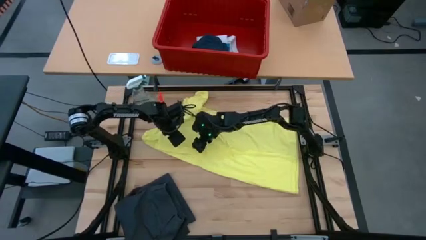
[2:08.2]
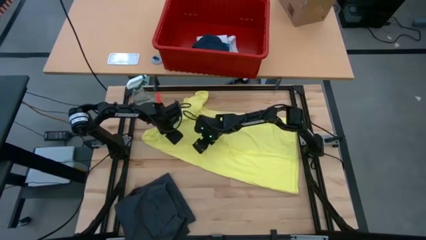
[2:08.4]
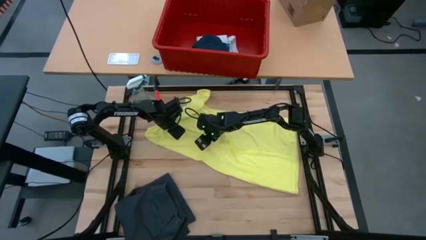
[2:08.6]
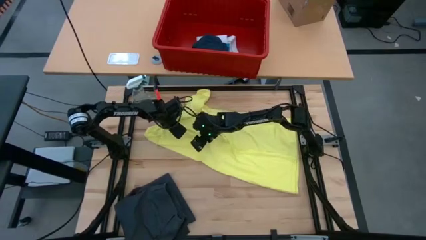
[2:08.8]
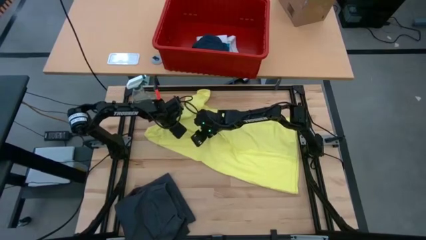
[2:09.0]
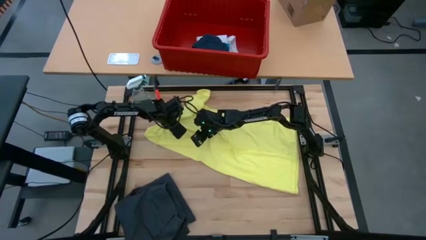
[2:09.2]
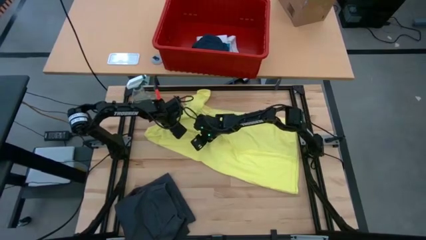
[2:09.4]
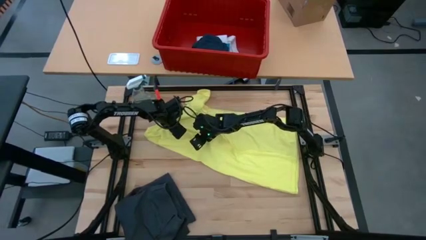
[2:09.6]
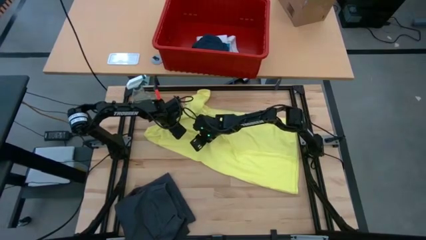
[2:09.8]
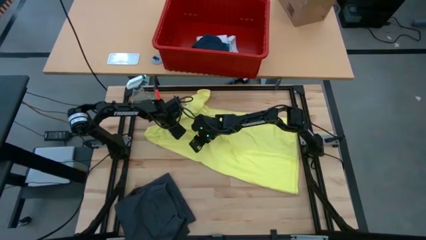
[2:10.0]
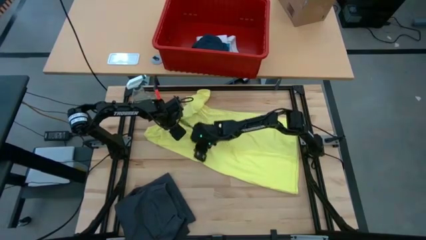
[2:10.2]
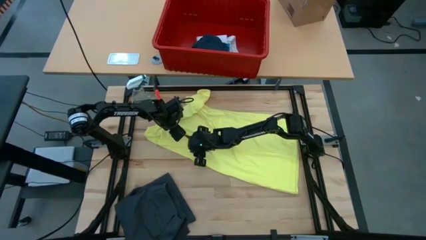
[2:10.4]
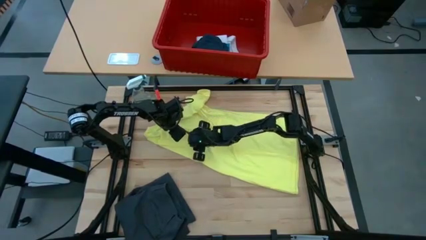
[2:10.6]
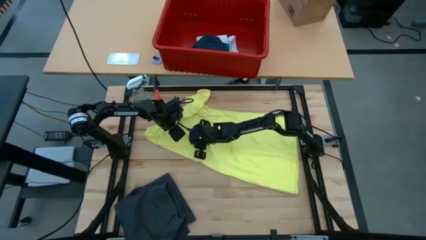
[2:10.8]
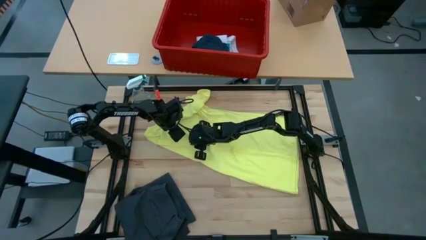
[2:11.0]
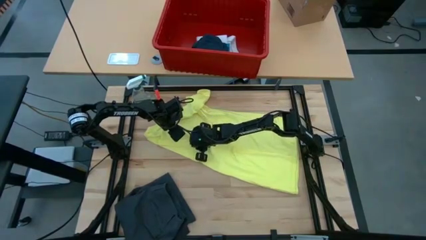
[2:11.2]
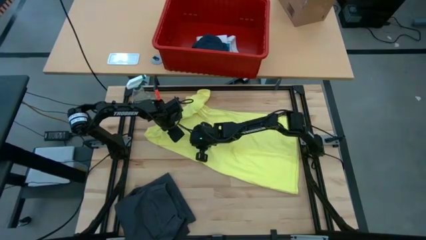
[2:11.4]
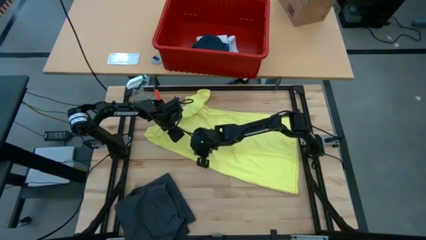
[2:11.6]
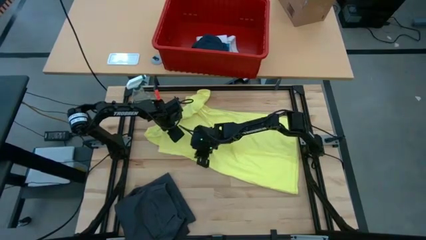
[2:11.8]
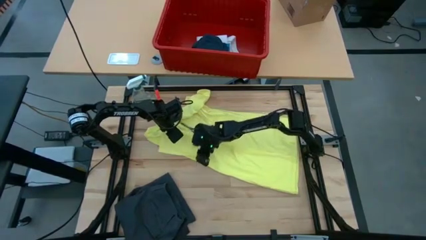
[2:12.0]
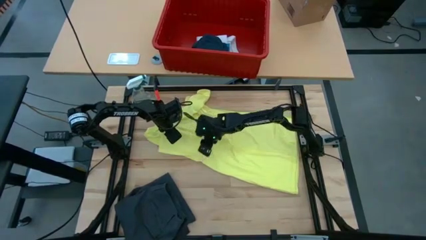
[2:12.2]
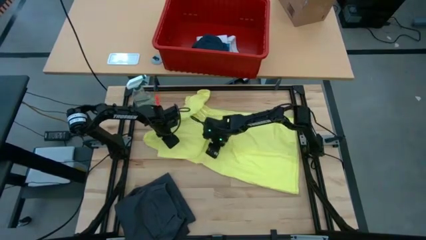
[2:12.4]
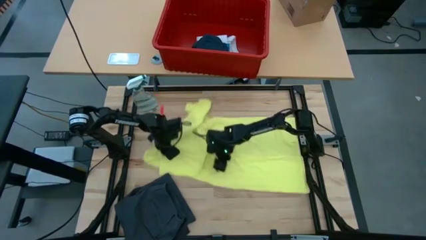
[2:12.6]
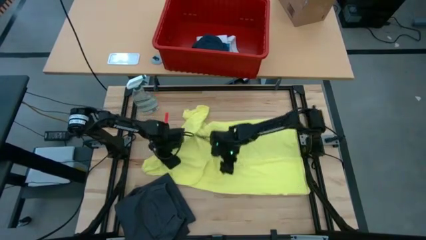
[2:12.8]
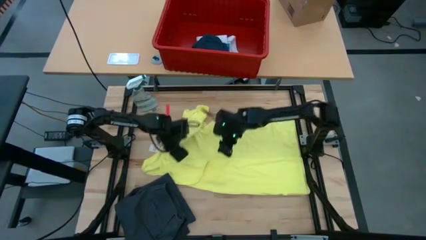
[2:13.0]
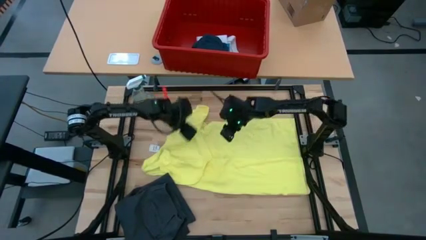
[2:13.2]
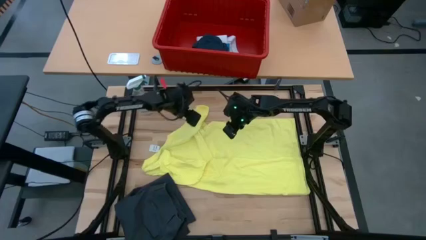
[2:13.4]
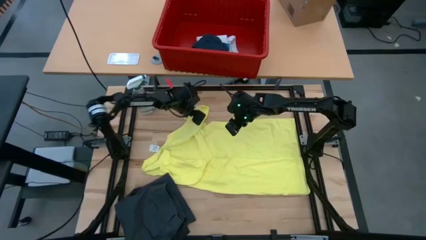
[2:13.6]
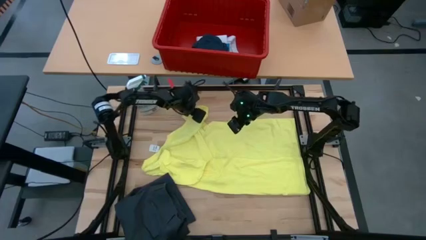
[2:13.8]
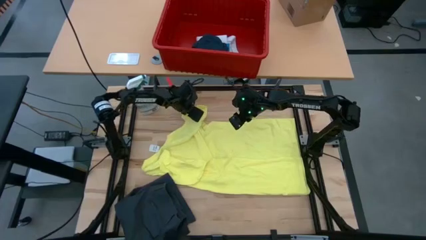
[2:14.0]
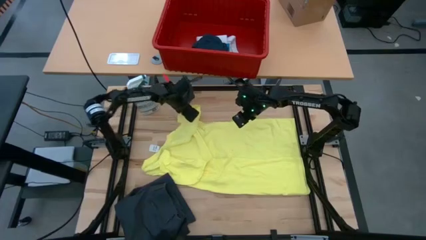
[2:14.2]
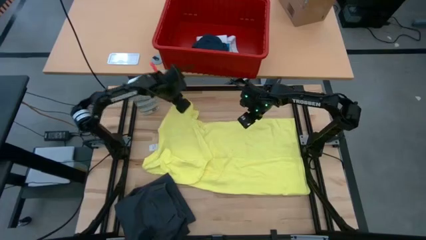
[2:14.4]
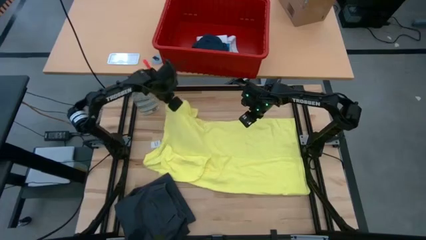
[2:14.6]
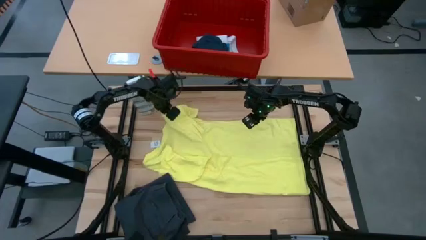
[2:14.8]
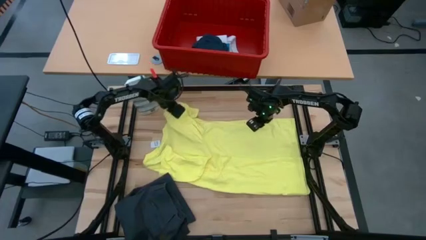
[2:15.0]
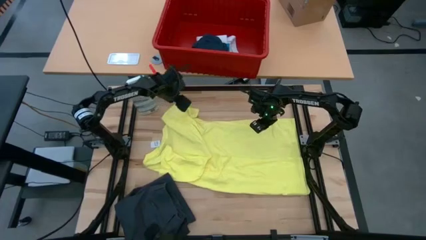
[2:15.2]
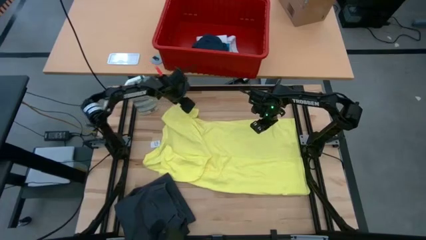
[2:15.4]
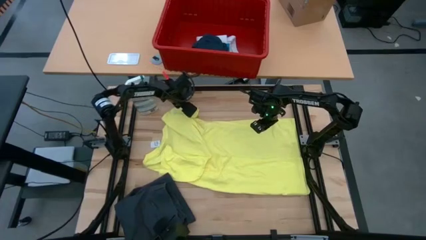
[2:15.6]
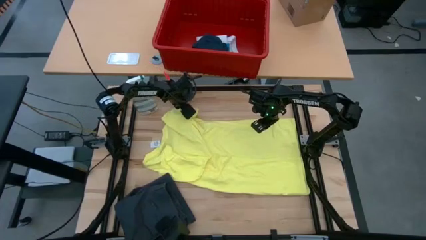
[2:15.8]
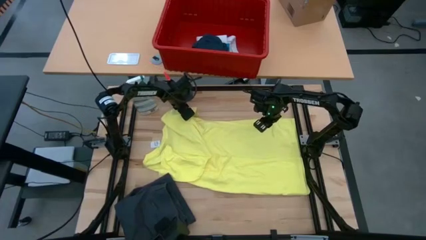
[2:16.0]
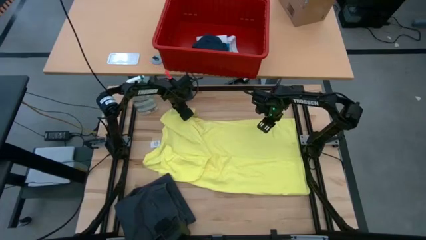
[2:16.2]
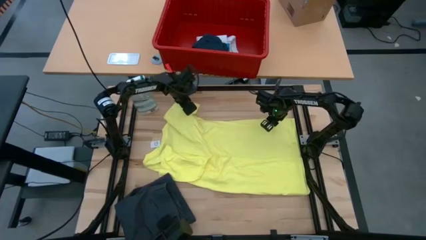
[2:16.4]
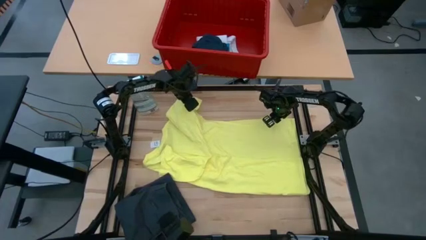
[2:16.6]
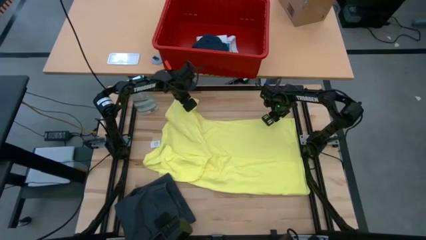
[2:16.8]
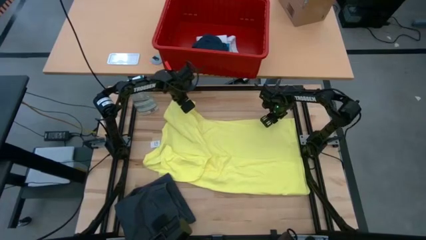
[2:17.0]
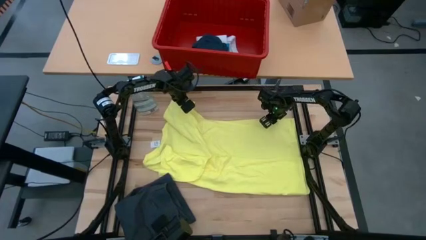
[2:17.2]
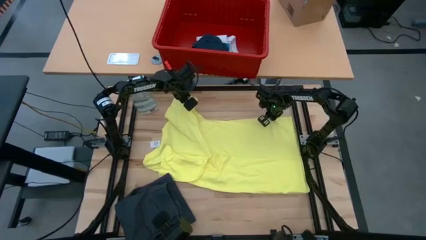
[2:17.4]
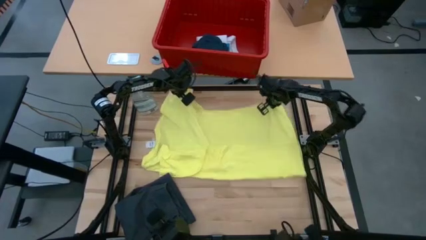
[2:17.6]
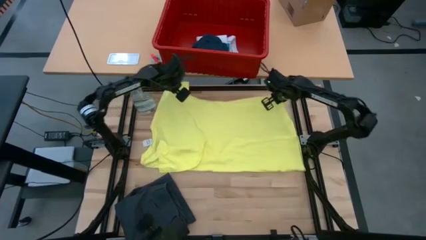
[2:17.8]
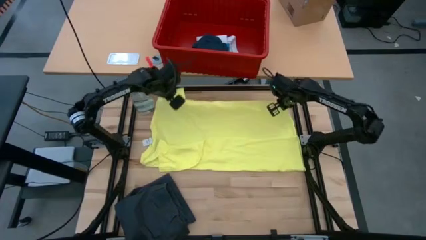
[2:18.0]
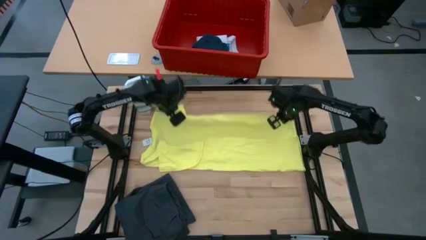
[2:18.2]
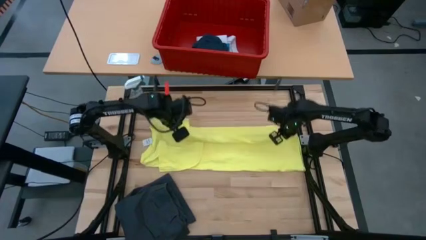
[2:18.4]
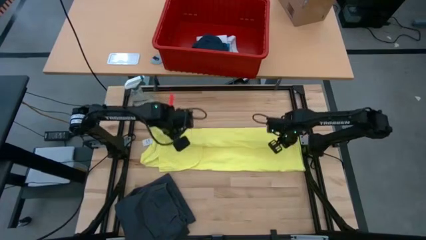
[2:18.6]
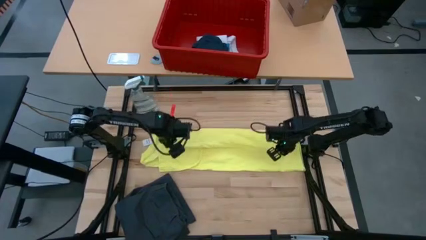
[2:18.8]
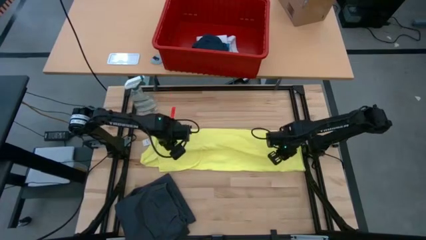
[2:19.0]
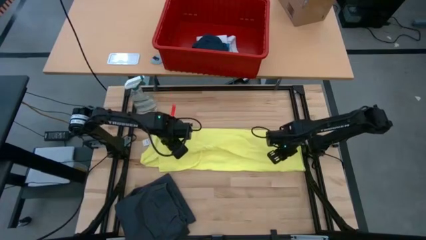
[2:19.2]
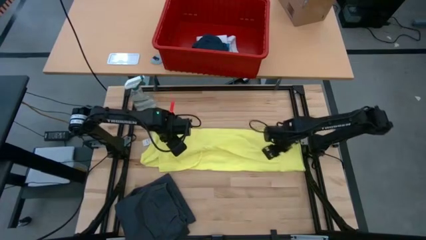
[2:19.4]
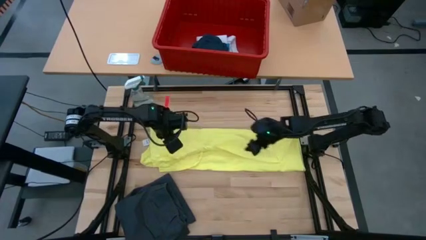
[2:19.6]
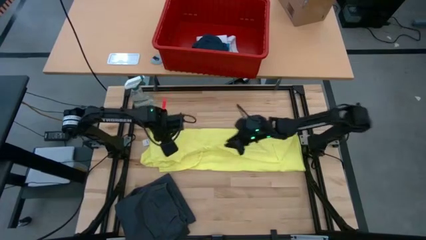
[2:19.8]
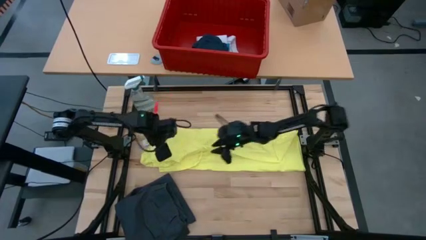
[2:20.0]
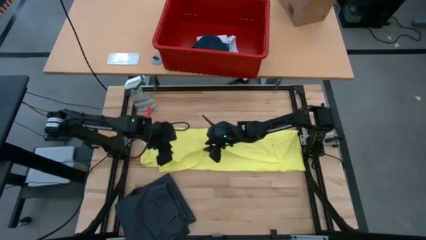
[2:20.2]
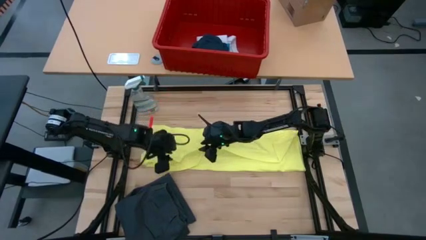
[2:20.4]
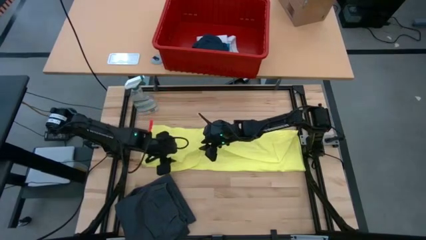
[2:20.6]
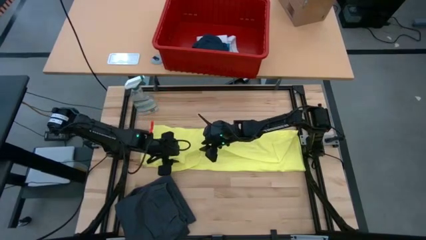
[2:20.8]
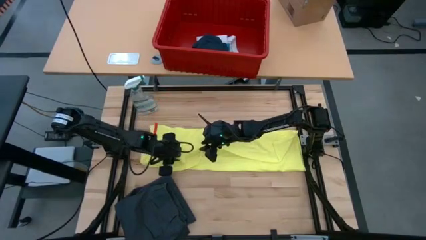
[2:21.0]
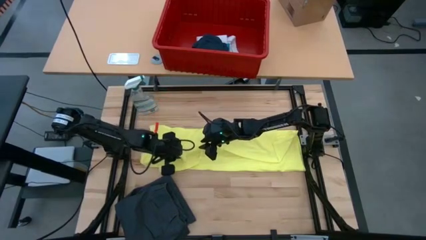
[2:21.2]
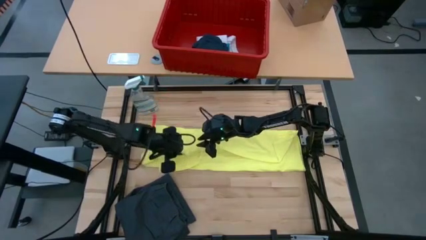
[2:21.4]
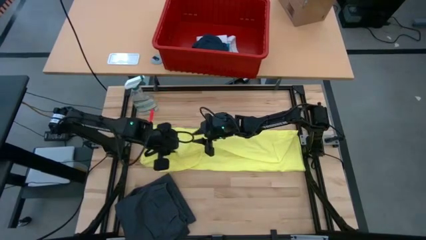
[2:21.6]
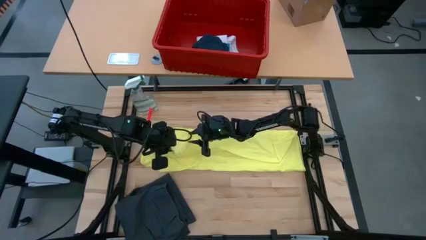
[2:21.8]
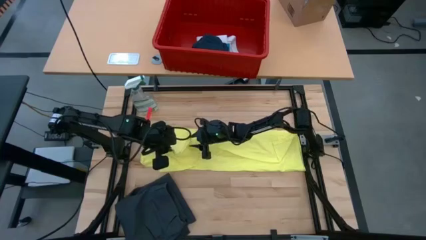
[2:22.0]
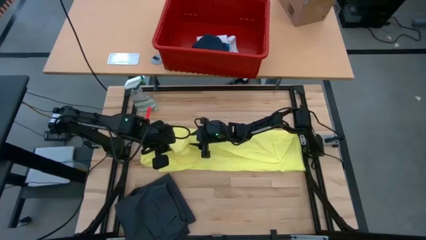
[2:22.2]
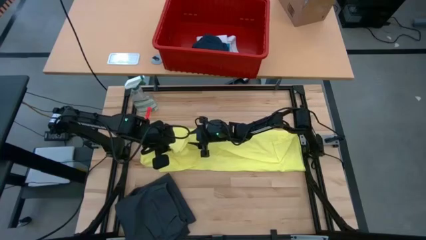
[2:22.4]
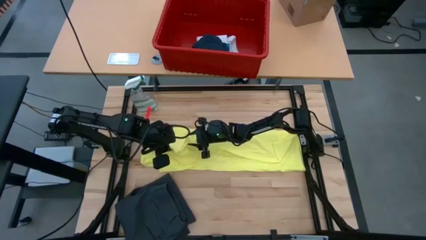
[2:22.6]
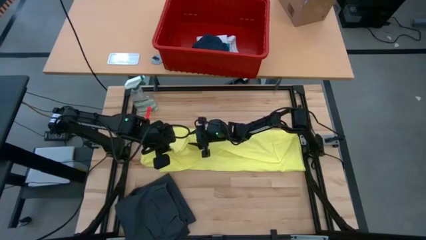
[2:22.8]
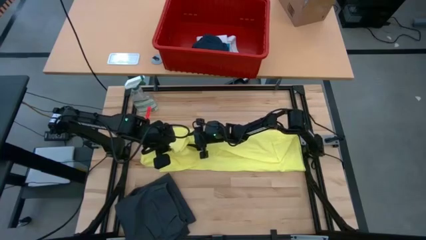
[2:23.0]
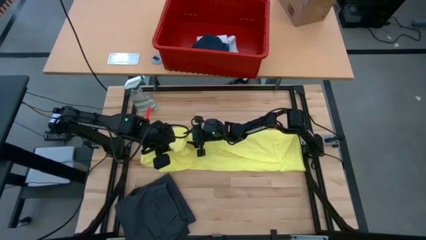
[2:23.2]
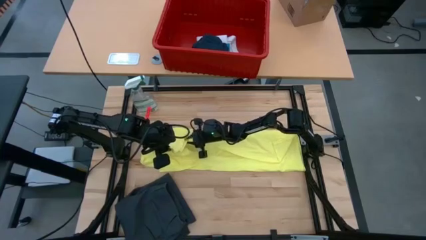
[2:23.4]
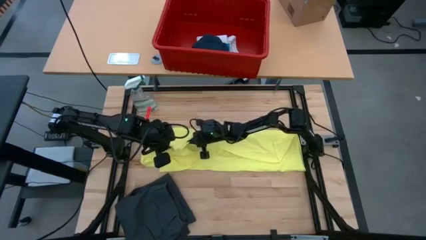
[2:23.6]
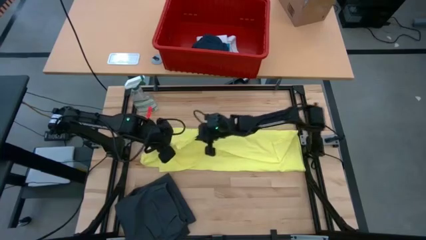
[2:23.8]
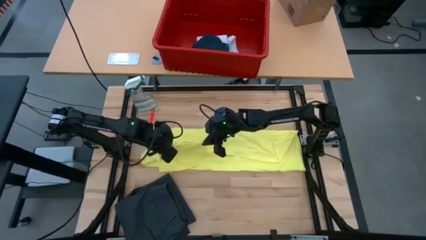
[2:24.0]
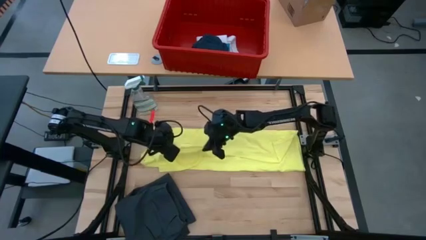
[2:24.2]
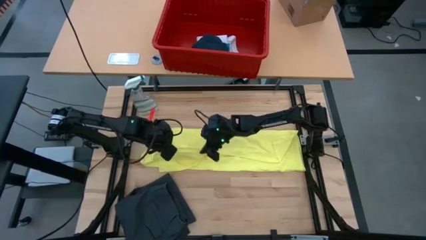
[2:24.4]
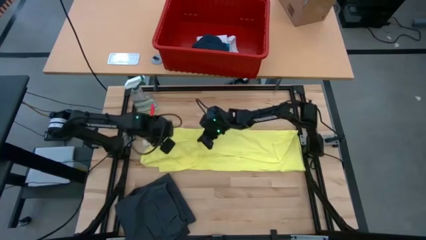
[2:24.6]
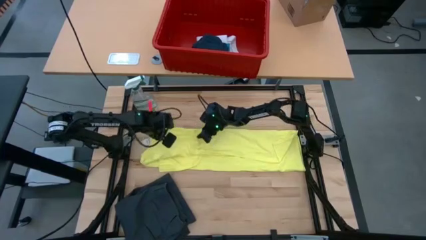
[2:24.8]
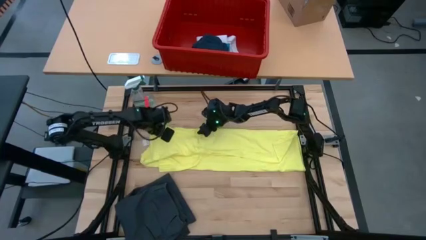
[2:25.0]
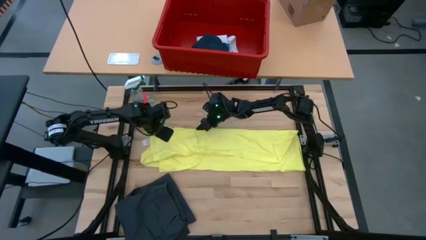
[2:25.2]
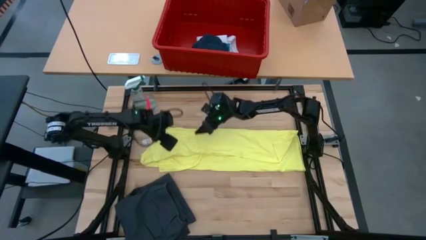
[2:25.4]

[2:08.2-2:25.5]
Task: Fold Laundry from Bin
Fold the yellow shirt
